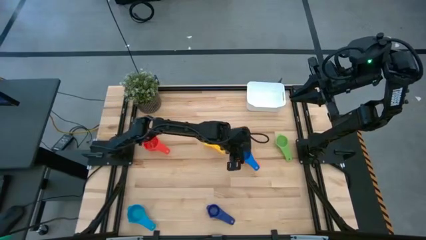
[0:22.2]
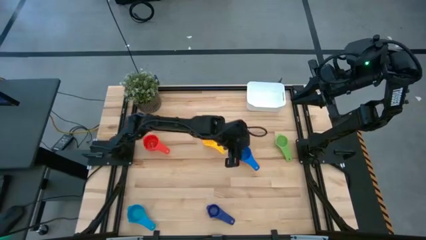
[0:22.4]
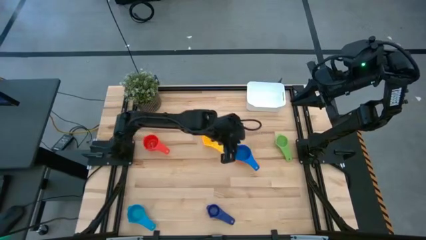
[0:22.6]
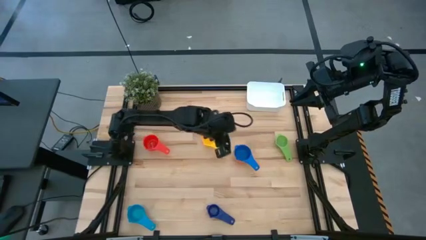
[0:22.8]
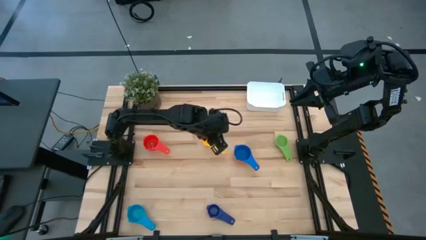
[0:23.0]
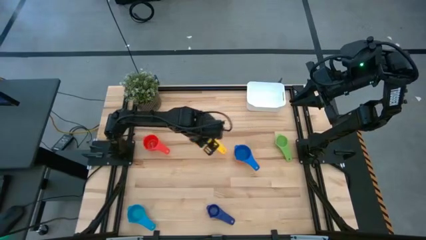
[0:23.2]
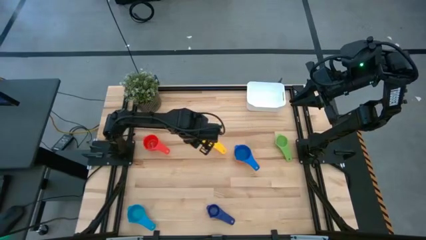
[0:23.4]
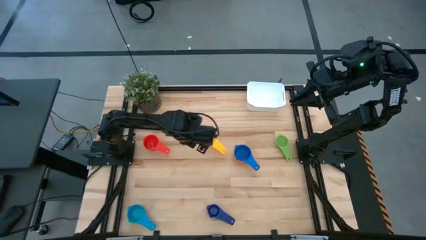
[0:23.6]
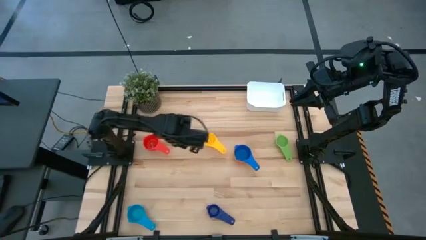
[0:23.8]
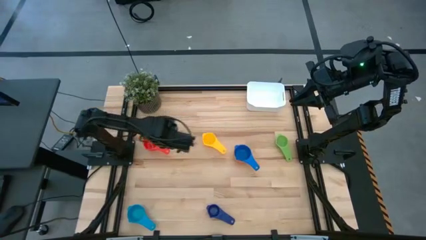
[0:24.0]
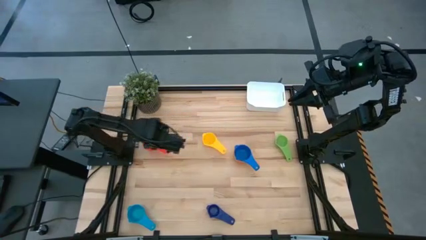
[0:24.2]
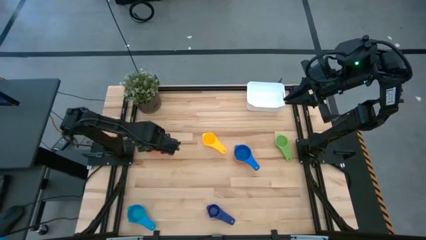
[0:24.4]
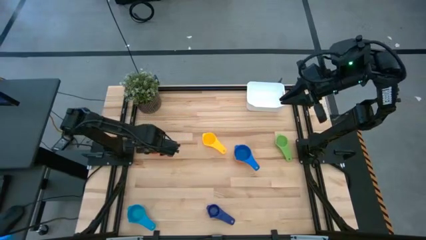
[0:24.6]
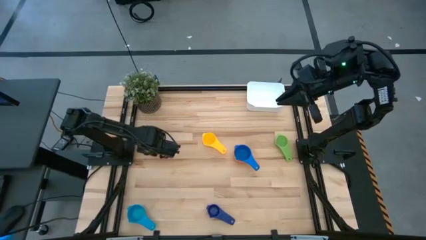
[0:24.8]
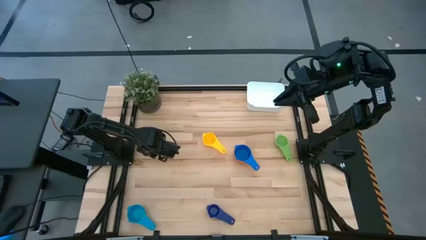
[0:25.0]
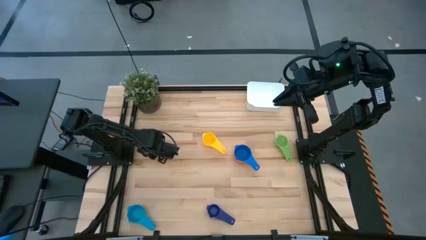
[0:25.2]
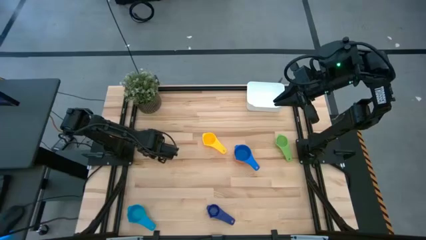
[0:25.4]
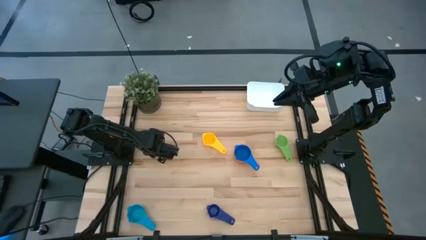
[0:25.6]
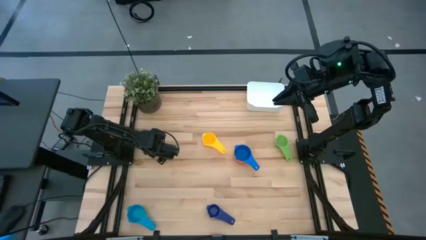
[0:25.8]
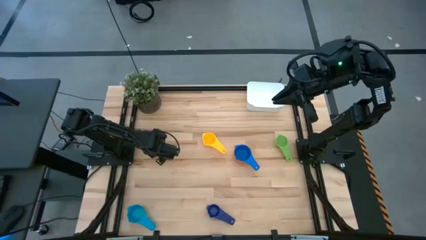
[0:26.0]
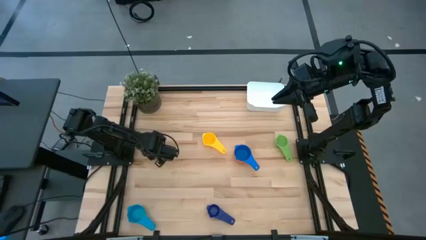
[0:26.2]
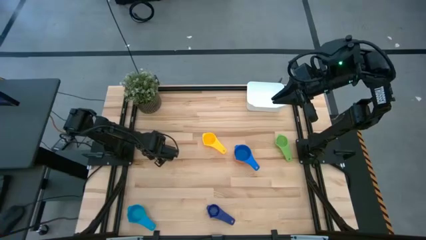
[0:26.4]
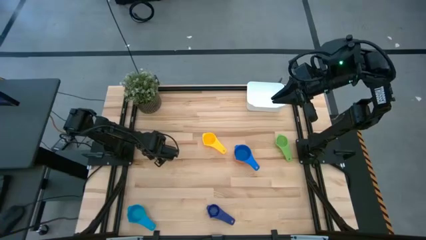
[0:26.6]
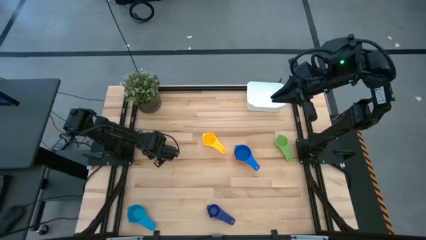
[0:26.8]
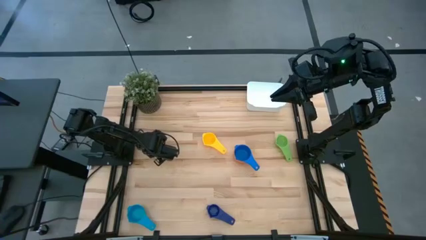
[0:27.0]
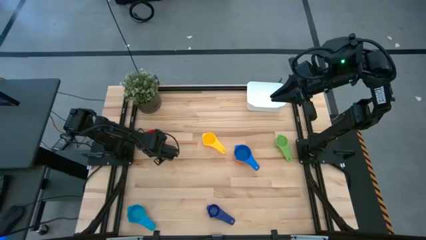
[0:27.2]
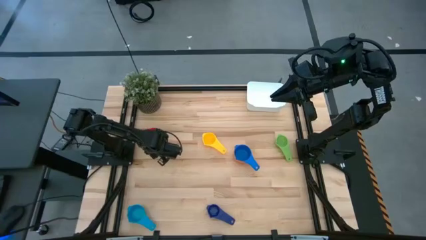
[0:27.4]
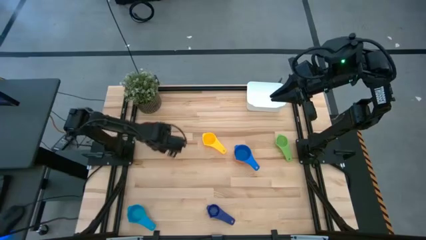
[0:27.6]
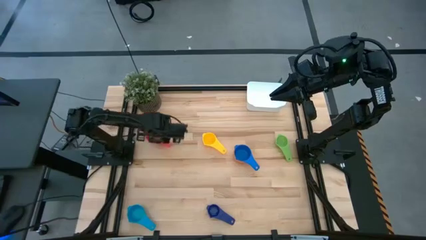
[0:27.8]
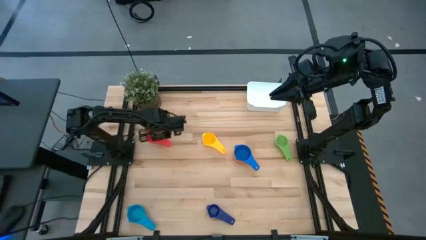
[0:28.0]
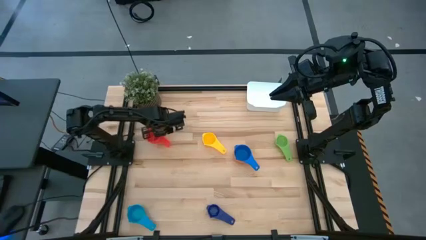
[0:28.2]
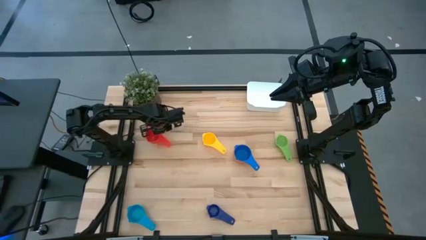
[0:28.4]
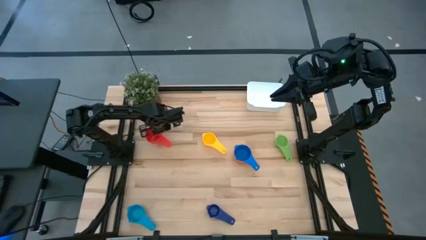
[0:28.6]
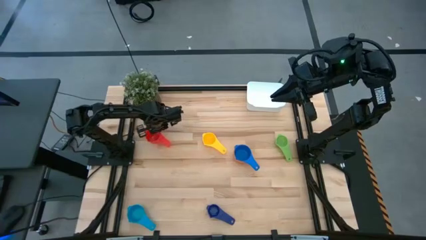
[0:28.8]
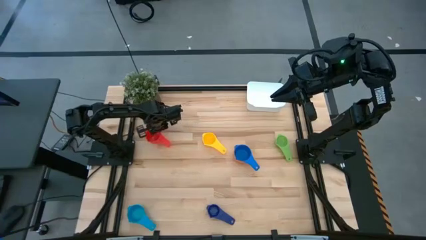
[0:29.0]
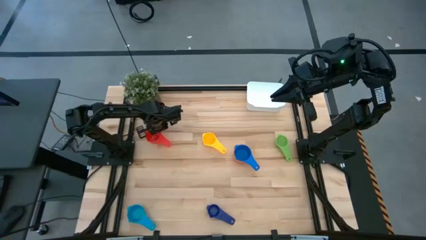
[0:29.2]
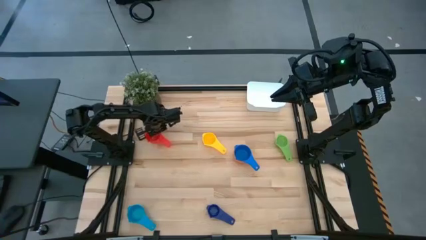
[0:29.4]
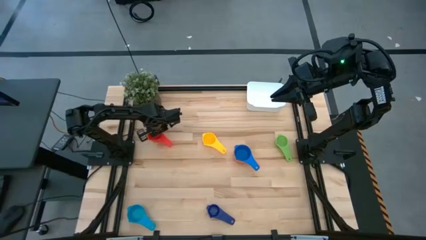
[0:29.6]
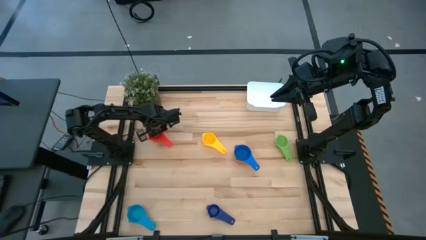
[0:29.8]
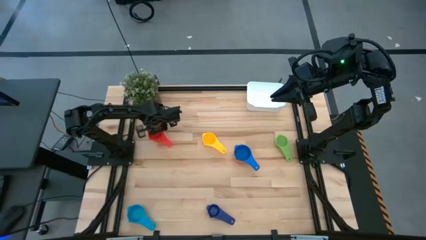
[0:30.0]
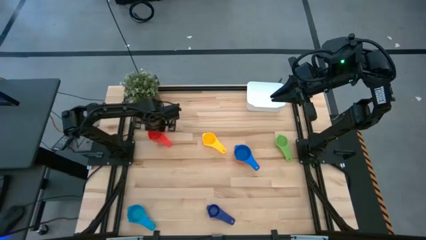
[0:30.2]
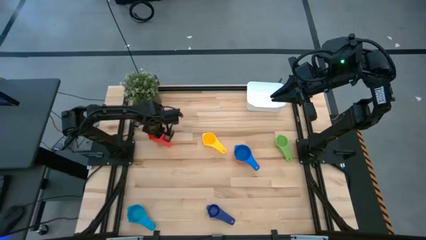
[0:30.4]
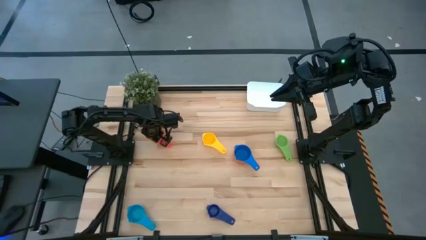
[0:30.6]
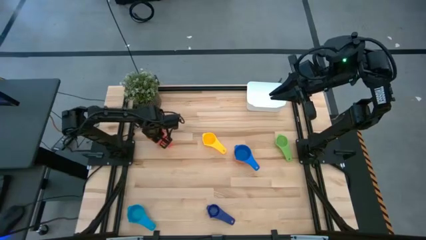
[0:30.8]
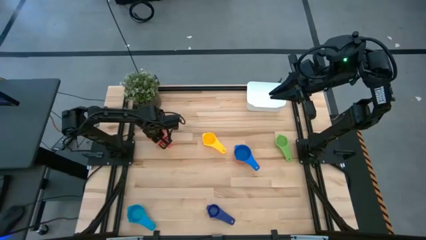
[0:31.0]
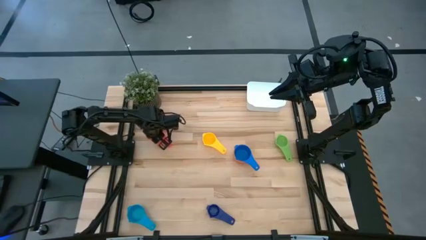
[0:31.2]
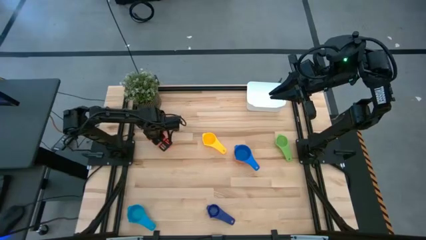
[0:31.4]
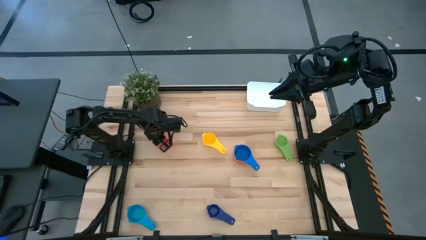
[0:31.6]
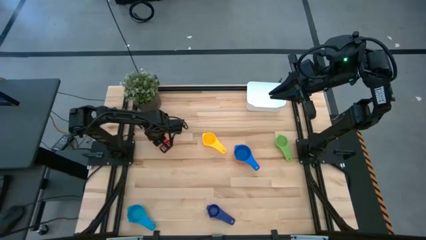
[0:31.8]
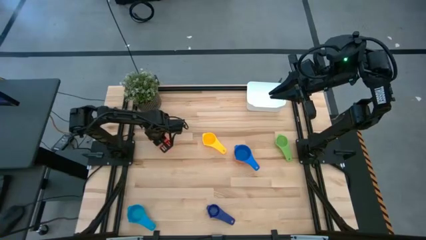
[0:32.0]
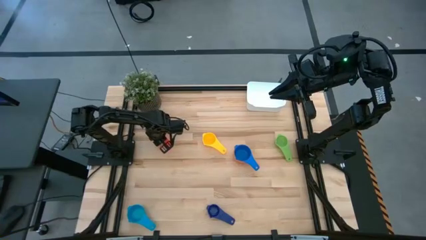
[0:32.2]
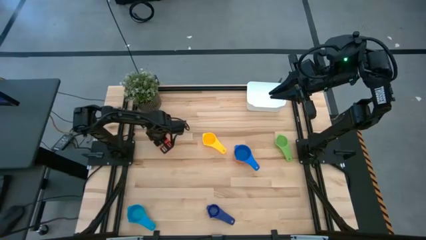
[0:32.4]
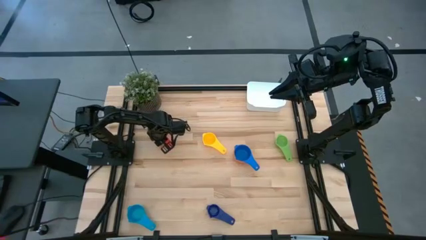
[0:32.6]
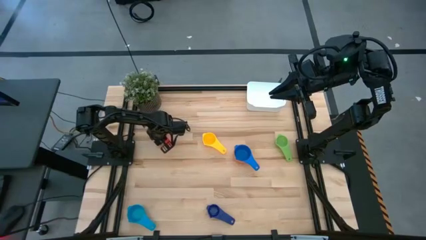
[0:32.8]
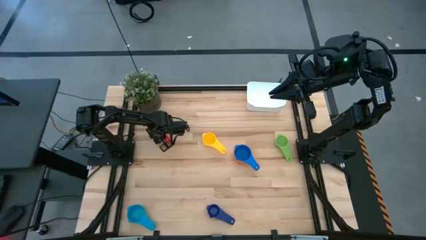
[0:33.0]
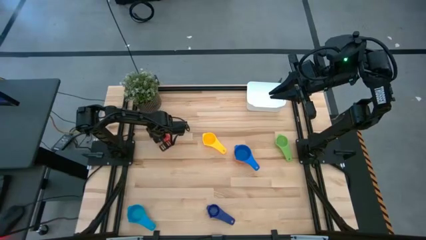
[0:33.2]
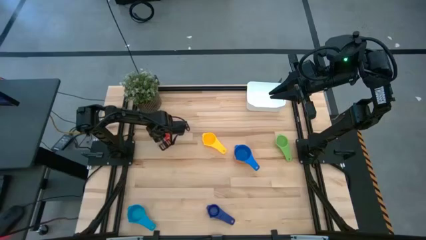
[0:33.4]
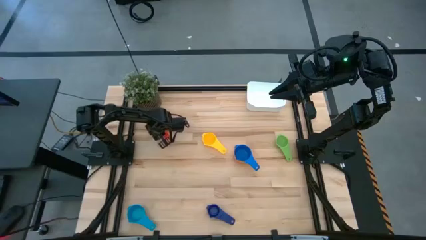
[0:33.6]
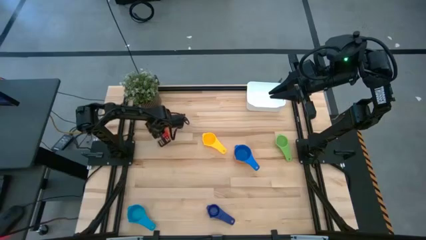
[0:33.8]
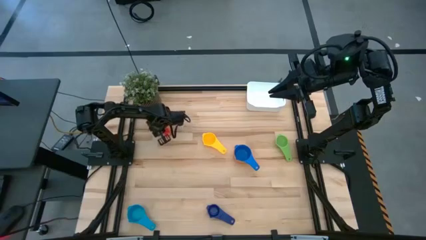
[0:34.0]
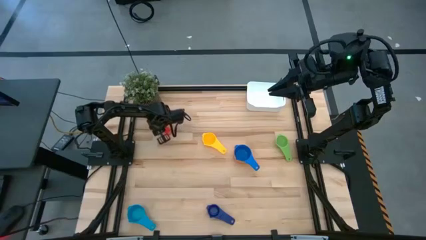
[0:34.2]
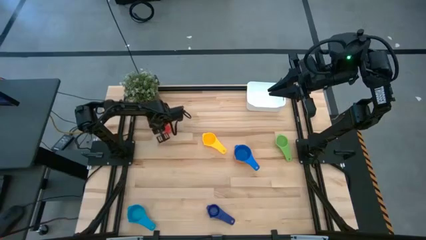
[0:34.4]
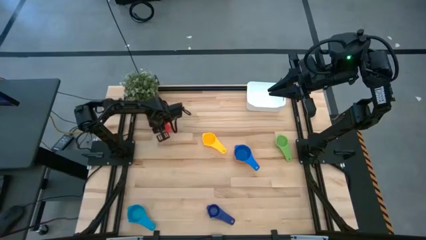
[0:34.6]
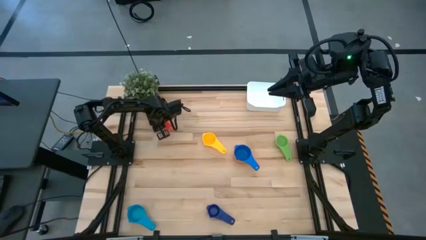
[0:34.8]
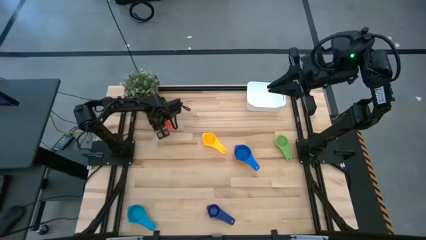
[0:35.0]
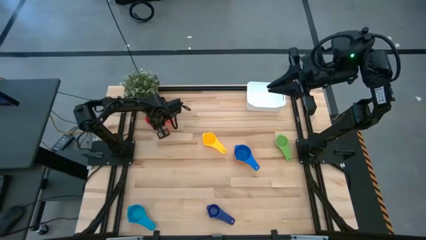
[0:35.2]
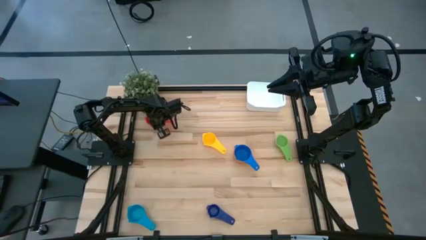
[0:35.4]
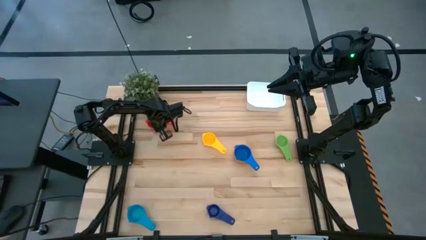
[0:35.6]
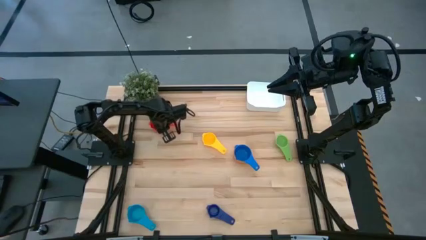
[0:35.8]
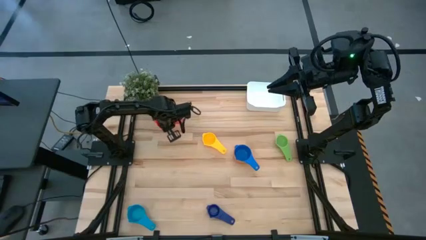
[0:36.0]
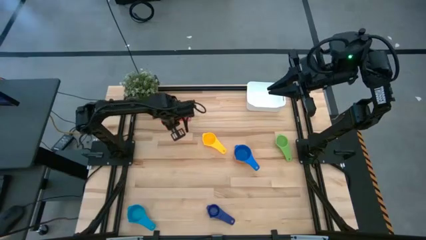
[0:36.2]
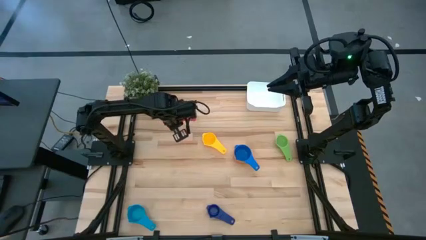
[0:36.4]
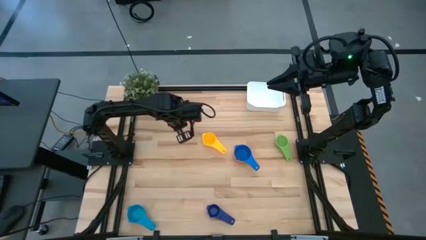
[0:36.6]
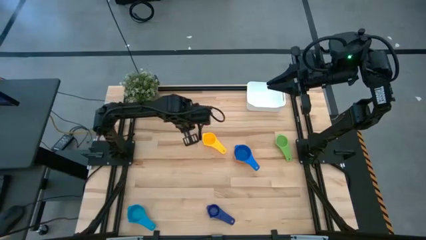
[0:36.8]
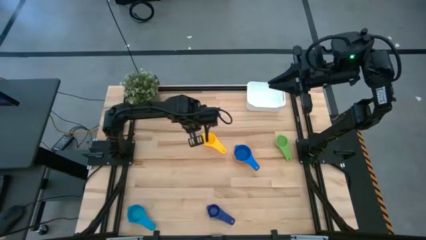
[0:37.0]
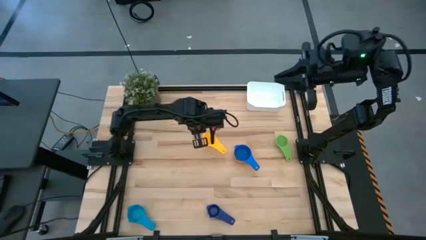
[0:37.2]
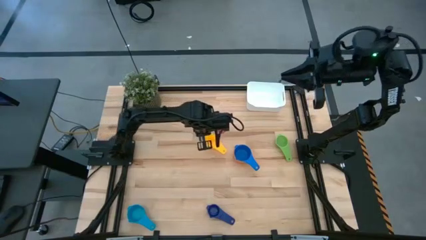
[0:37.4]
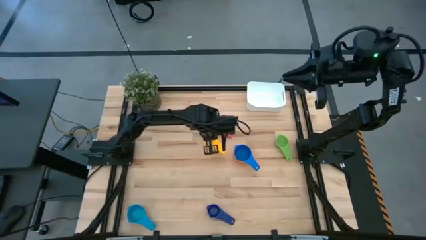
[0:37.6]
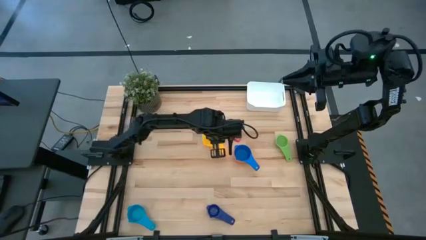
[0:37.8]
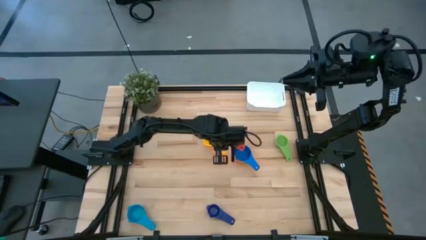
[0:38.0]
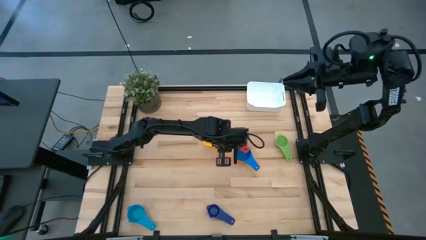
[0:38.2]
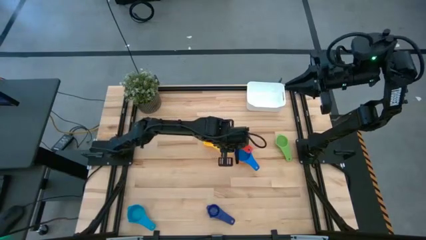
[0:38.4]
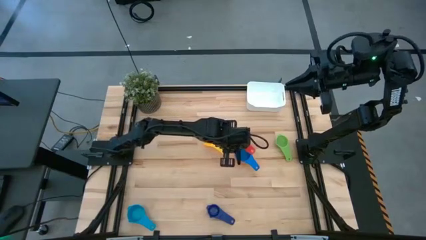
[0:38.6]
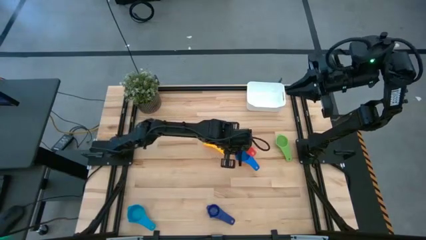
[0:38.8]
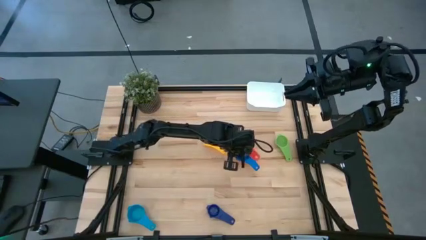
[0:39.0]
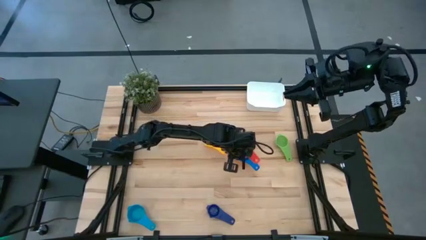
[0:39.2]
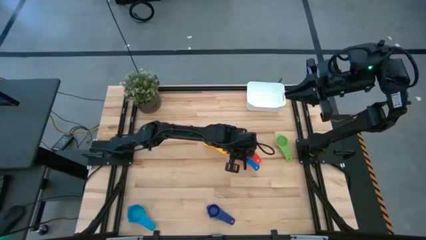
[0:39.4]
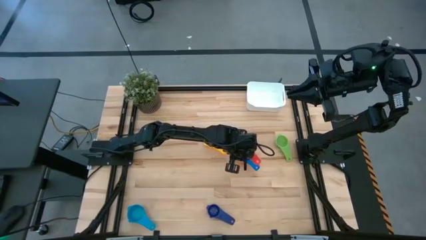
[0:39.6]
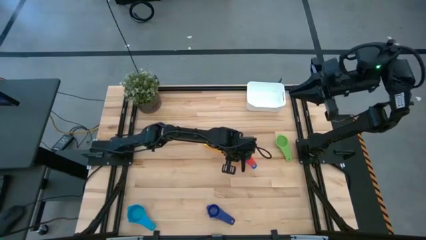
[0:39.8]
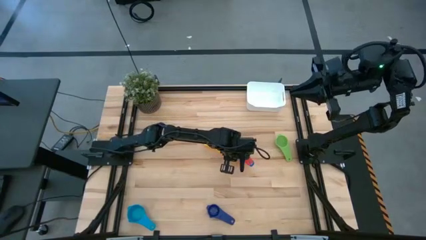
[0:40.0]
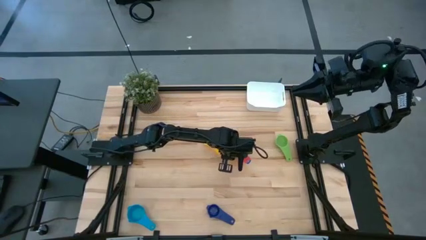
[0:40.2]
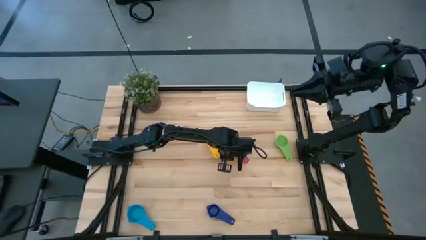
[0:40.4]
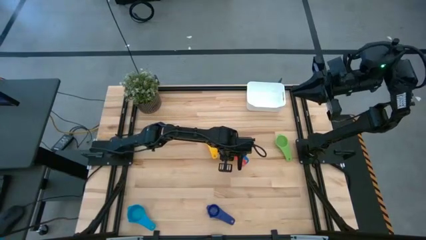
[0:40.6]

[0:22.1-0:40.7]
Task: Nest measuring cups in basket
Stack the red measuring cup on top of the blue measuring cup
